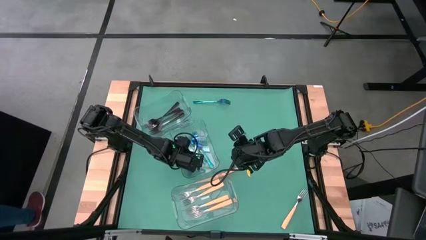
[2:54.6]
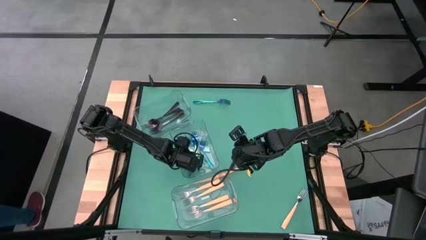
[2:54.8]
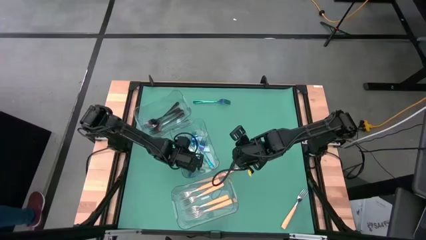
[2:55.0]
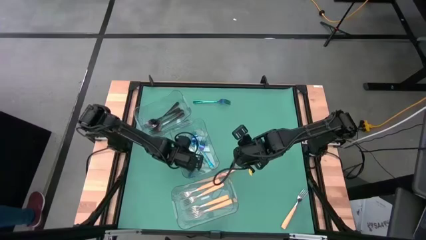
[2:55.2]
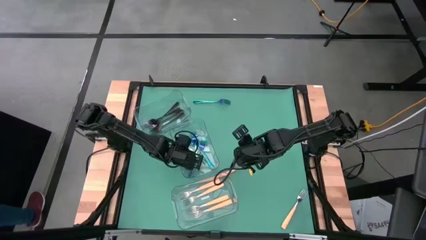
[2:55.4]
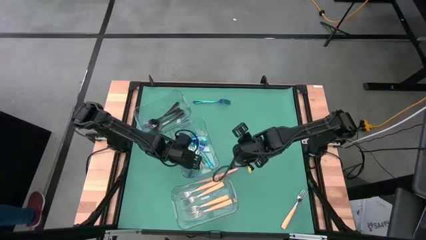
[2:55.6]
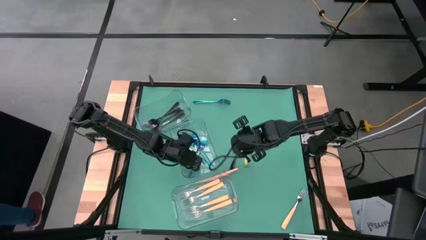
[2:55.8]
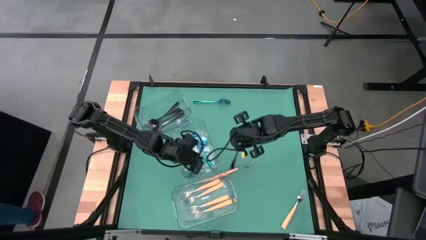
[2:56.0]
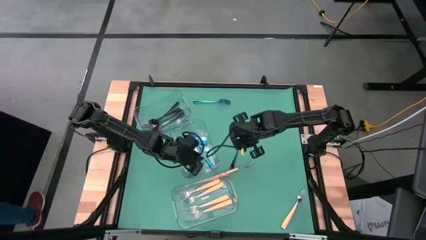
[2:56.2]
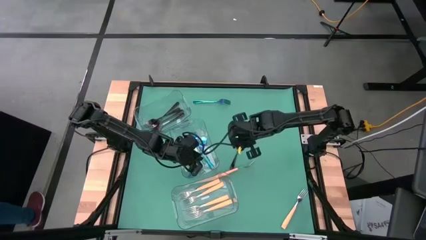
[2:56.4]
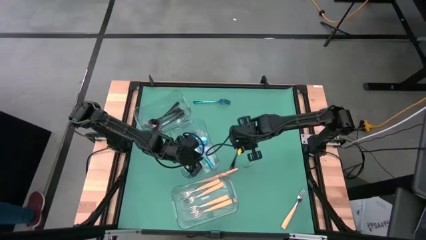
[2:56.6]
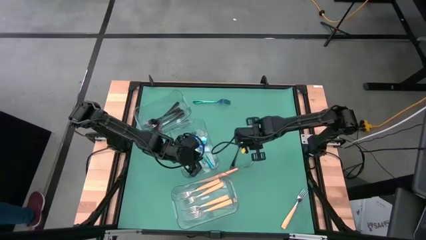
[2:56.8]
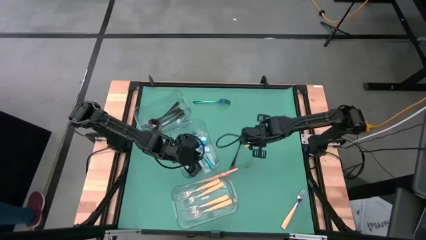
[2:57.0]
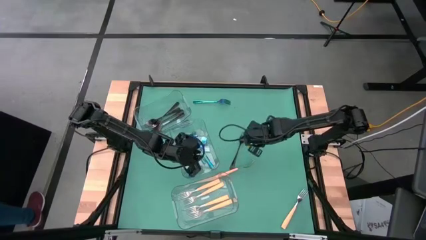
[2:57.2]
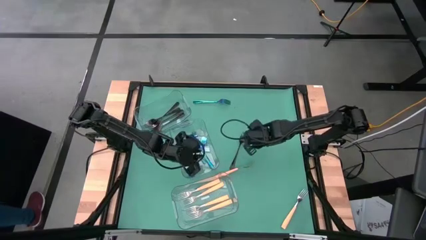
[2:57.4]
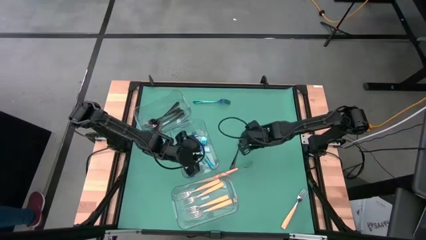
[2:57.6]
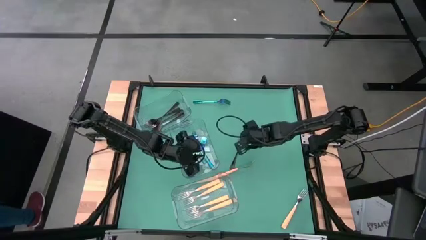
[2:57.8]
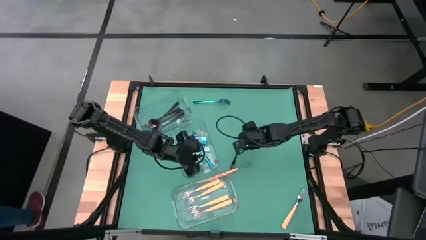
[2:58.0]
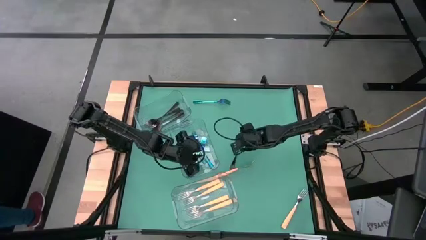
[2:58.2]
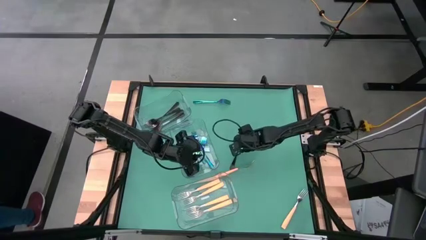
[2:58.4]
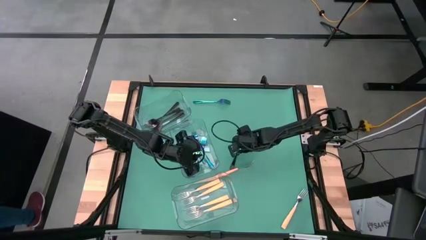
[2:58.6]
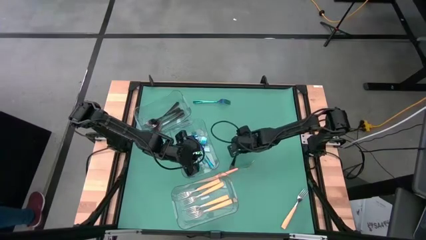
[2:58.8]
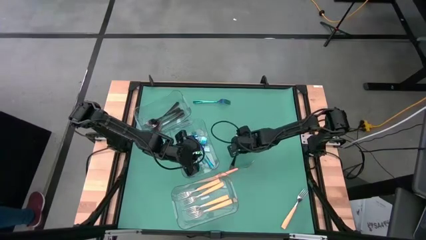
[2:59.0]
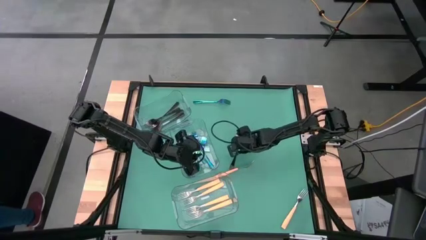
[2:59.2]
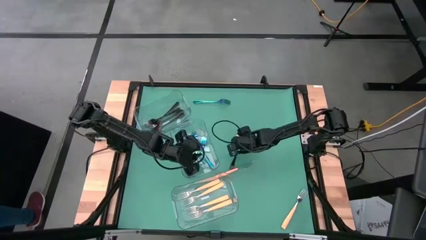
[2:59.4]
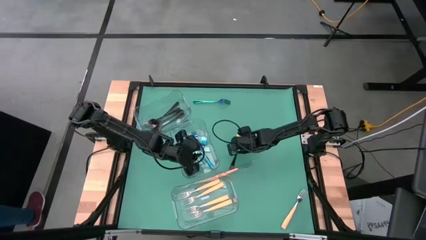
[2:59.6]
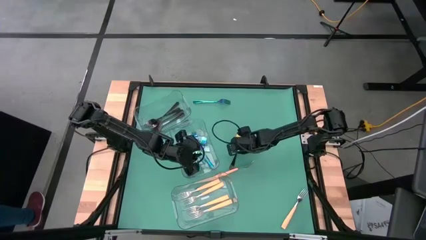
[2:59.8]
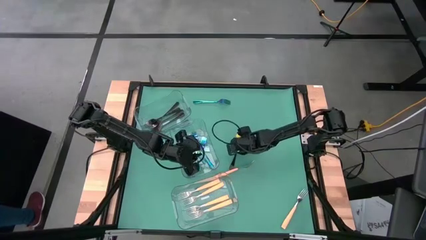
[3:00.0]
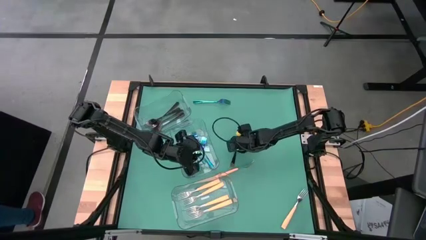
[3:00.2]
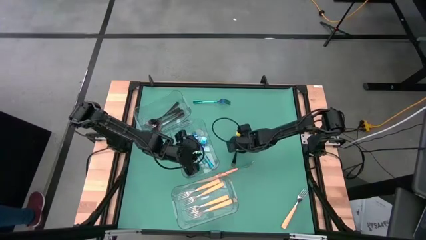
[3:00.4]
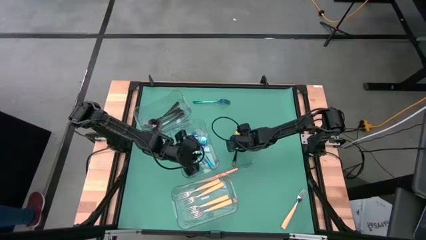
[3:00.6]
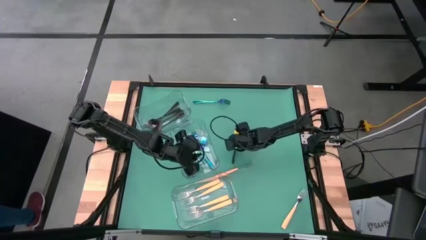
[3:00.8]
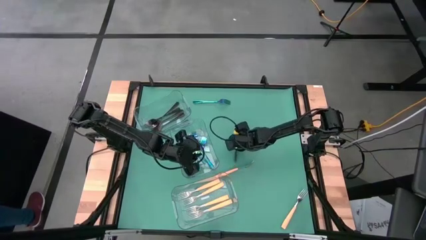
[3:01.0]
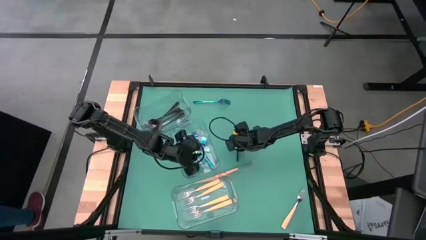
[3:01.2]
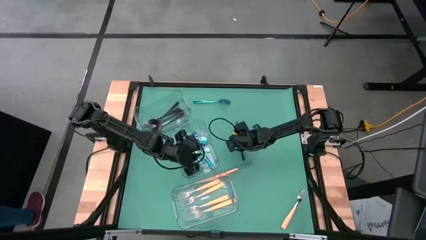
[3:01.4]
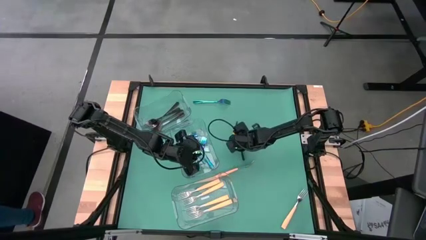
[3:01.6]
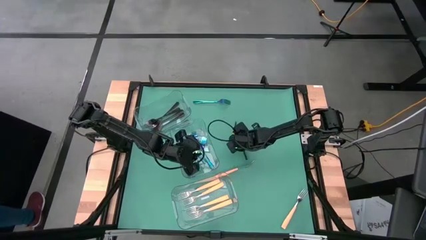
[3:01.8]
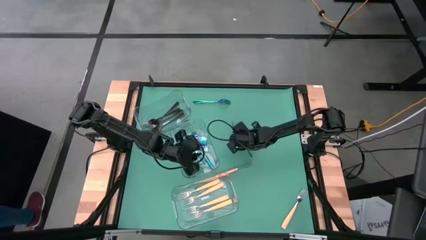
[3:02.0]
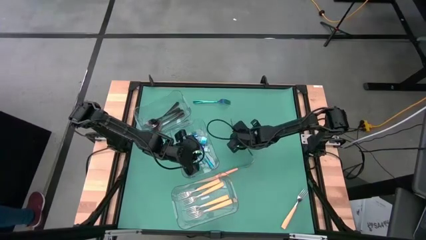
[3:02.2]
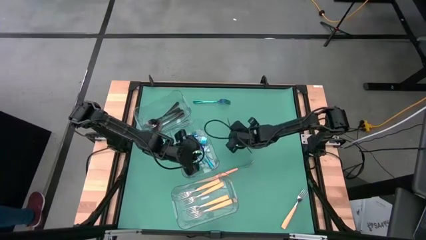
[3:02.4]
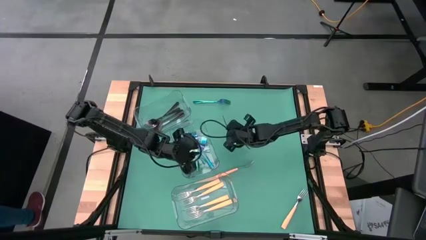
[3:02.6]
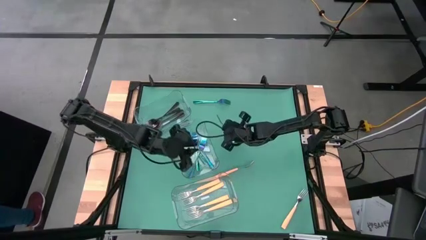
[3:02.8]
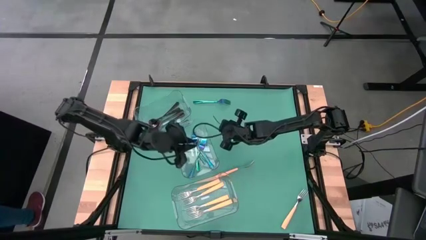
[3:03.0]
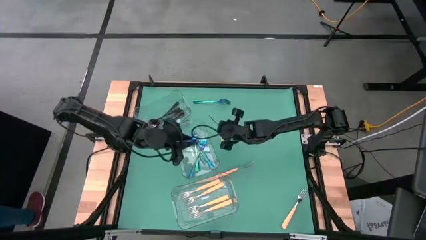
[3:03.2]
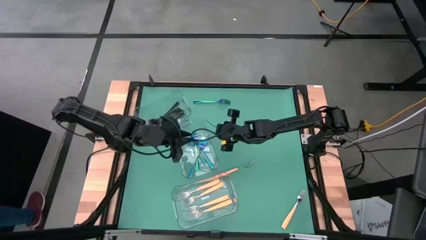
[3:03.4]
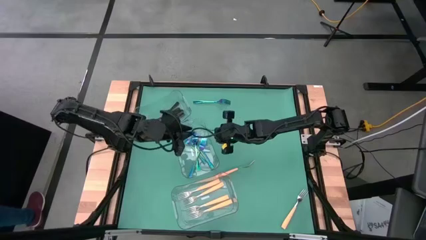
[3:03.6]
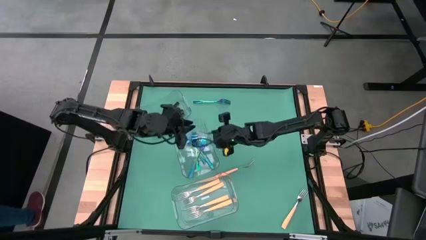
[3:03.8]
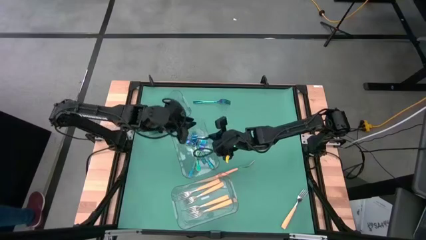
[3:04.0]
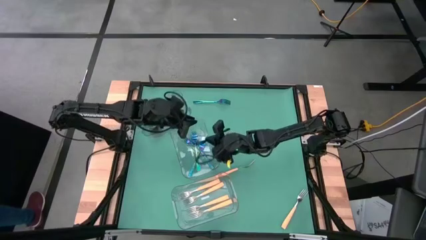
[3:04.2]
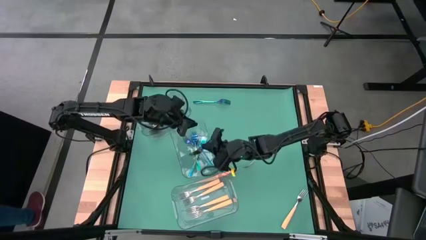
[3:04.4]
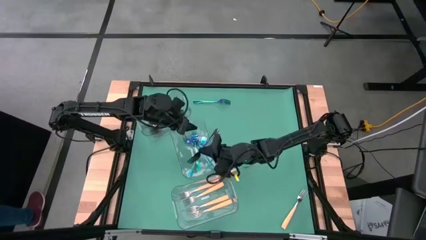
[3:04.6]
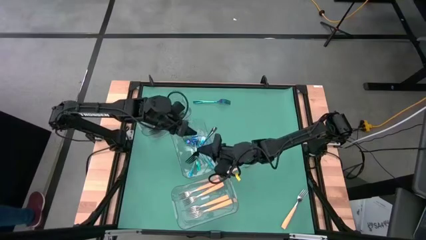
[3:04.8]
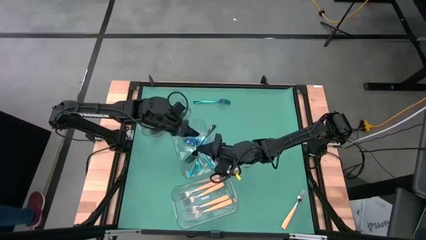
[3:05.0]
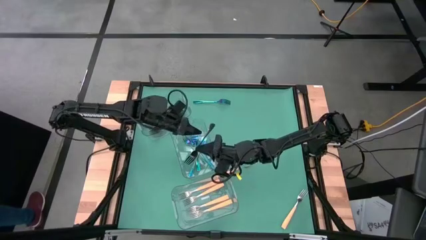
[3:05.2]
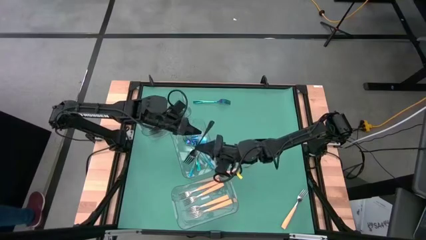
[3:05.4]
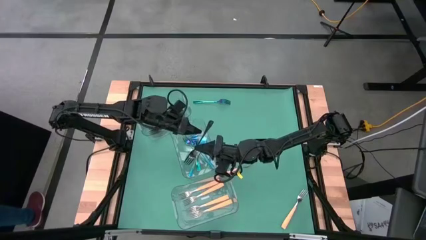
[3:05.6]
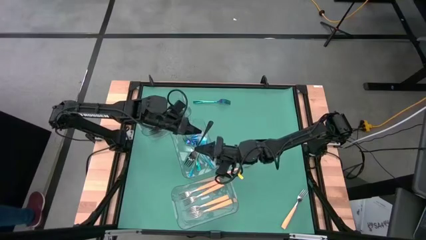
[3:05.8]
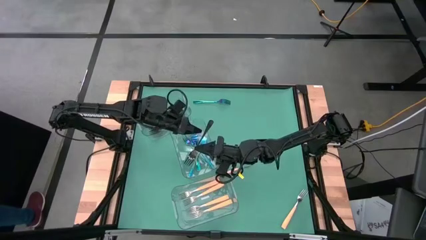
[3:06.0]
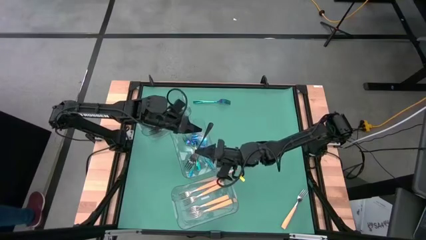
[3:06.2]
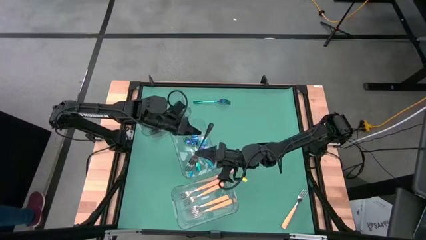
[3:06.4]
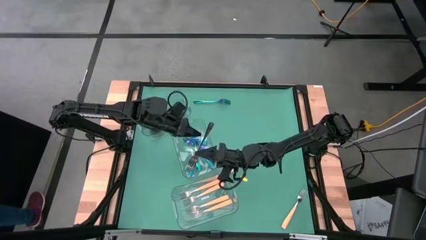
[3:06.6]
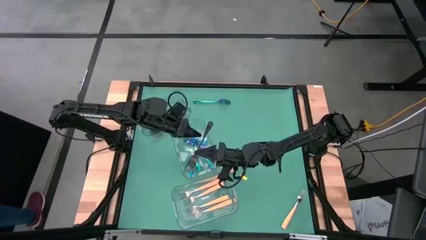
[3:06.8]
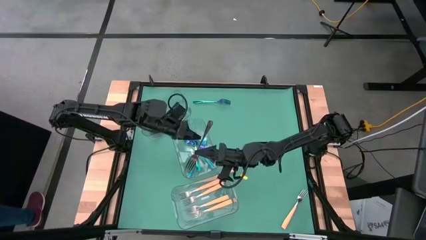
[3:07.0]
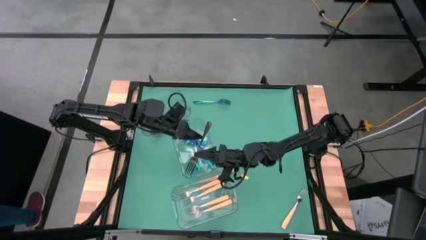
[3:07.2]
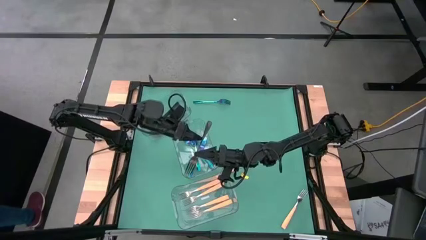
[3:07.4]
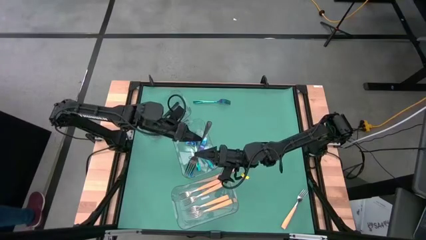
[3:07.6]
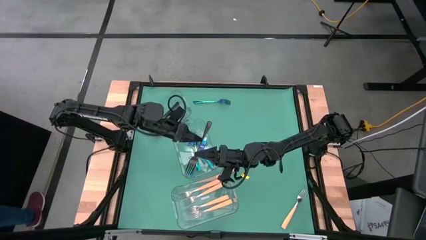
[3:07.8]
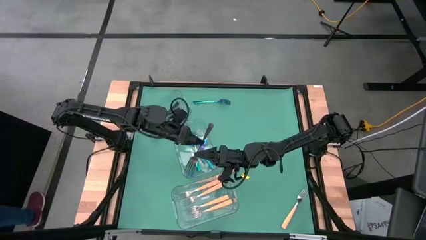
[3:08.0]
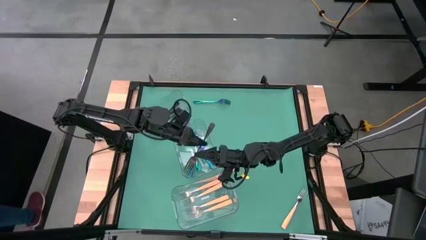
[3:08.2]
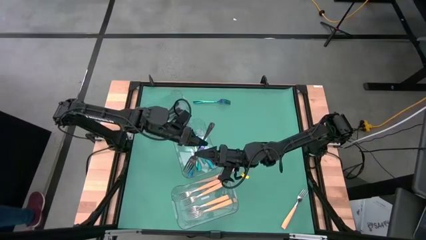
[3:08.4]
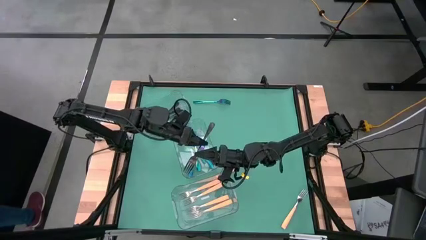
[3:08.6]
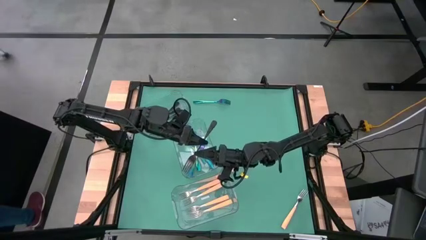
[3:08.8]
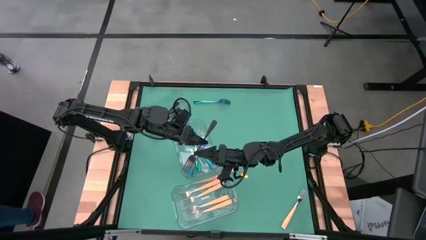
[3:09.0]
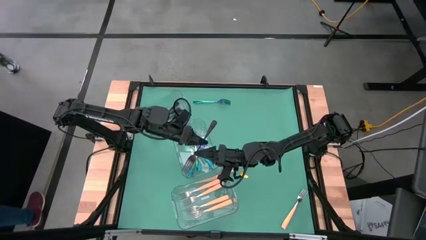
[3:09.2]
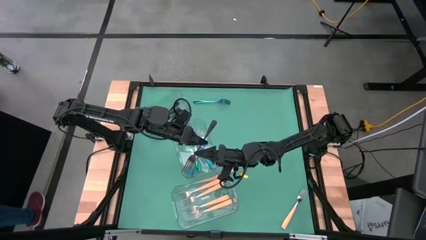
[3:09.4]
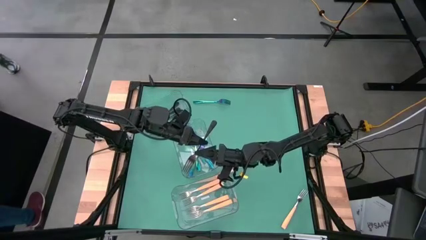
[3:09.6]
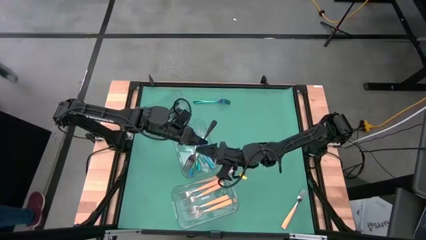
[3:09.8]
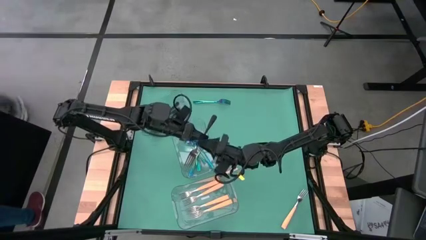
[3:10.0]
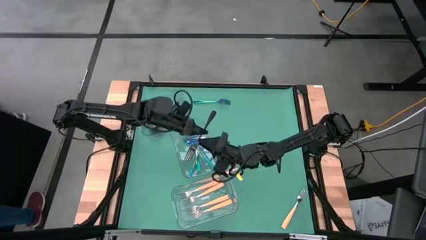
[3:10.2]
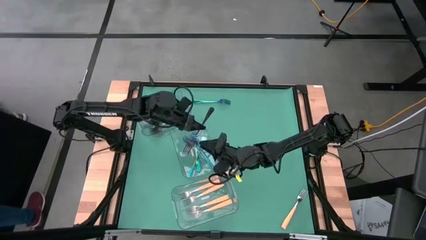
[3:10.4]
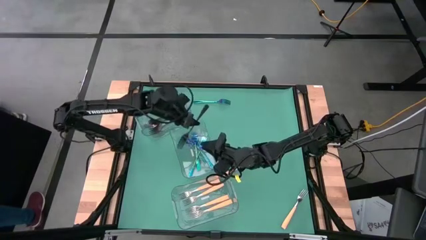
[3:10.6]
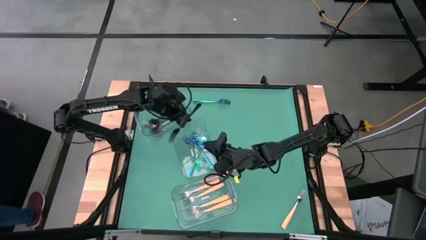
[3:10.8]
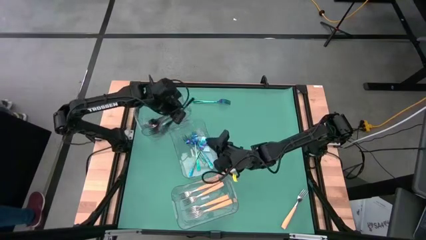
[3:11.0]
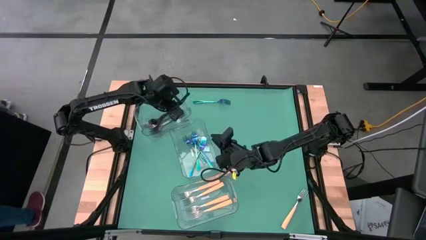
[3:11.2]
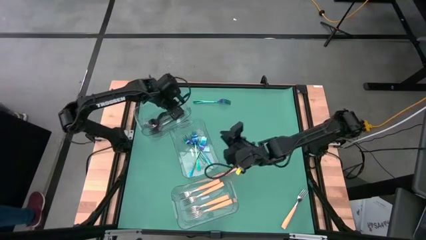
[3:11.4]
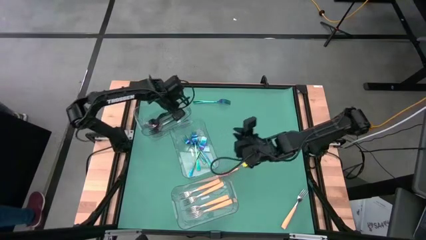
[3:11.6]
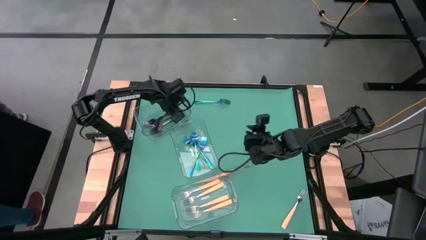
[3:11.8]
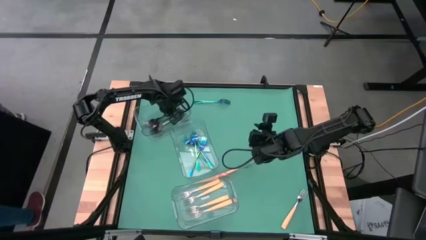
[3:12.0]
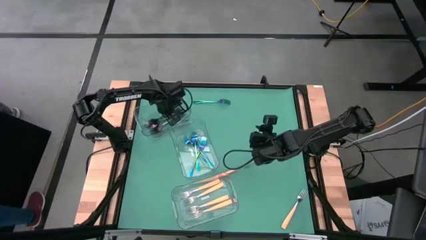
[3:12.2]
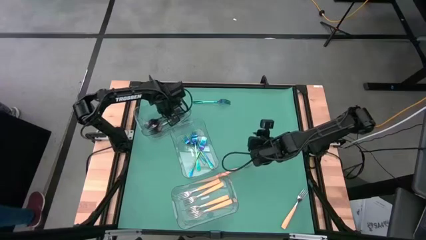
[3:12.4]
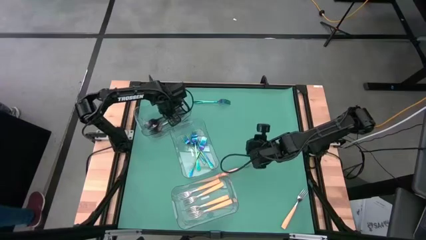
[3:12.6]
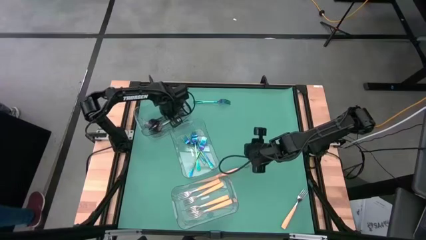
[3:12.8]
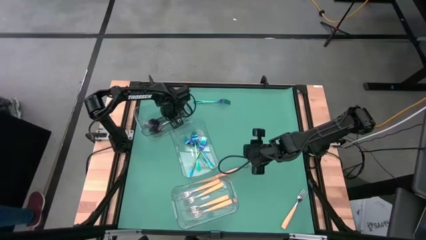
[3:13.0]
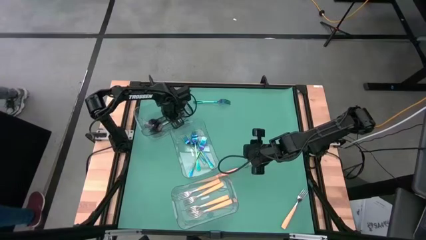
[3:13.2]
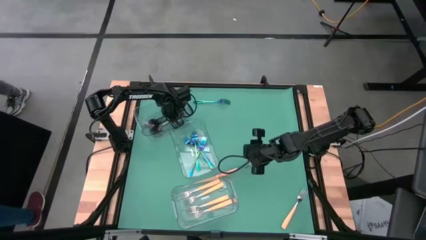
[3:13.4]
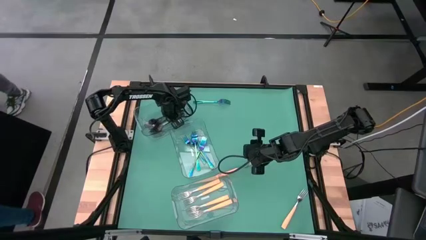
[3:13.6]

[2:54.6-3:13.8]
Task: Sort silverware by color (type)
Put the black fork into the top transparent bin
